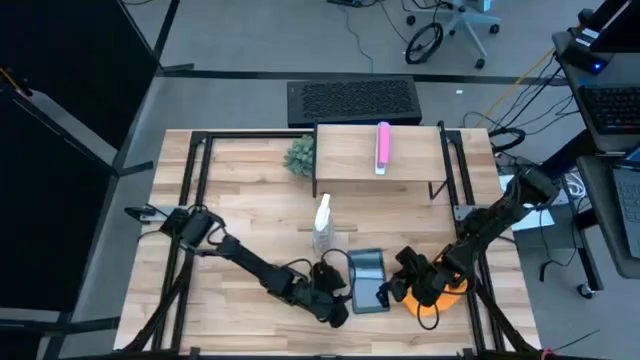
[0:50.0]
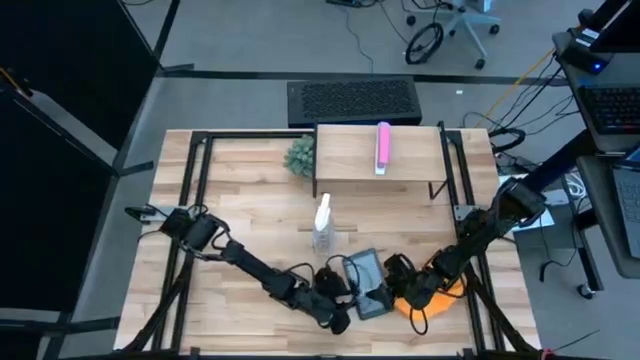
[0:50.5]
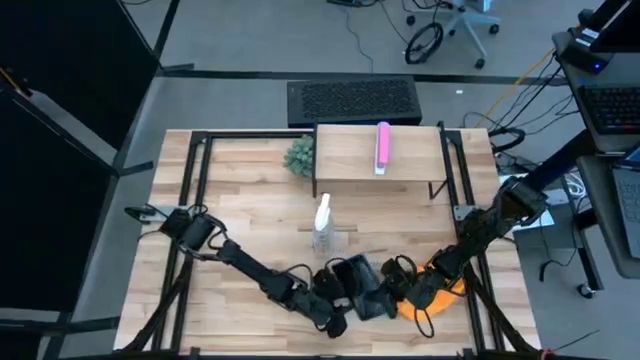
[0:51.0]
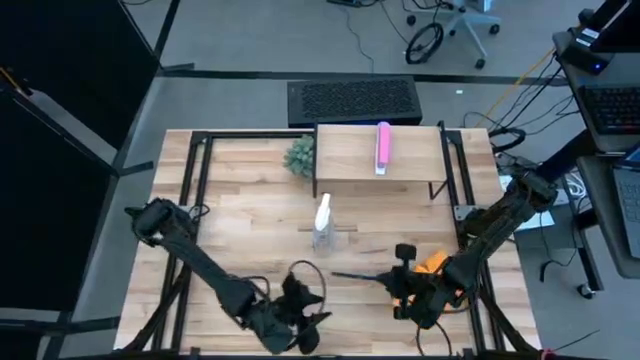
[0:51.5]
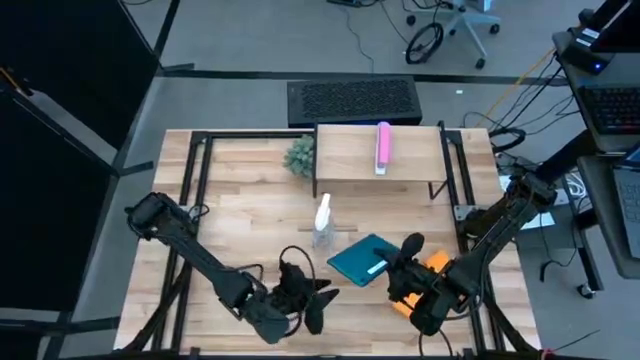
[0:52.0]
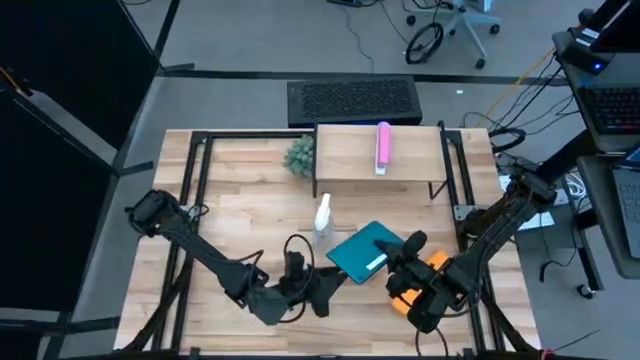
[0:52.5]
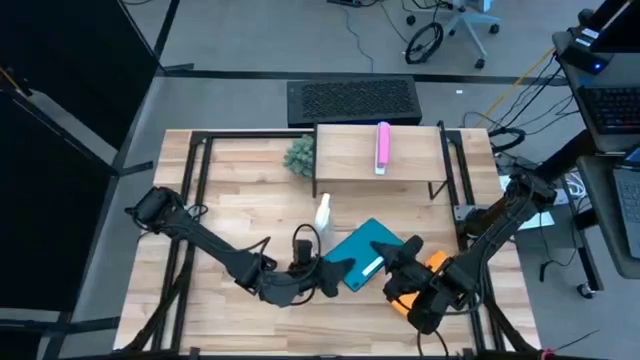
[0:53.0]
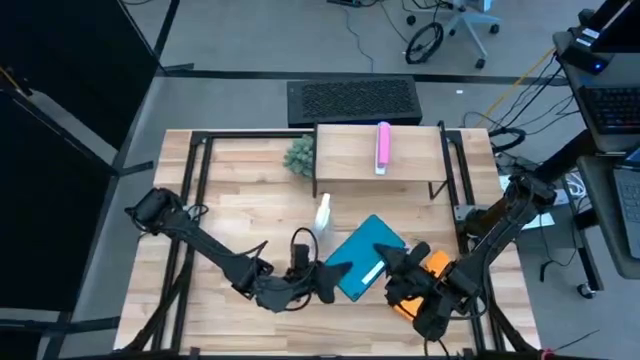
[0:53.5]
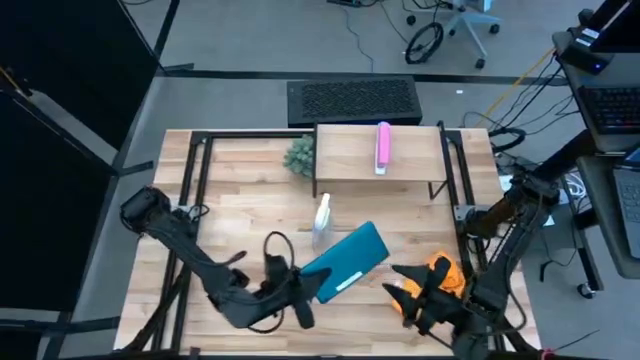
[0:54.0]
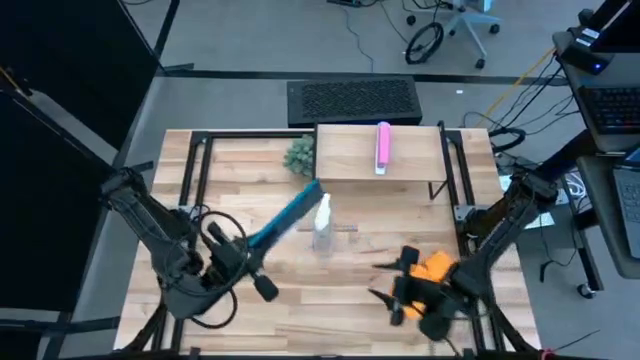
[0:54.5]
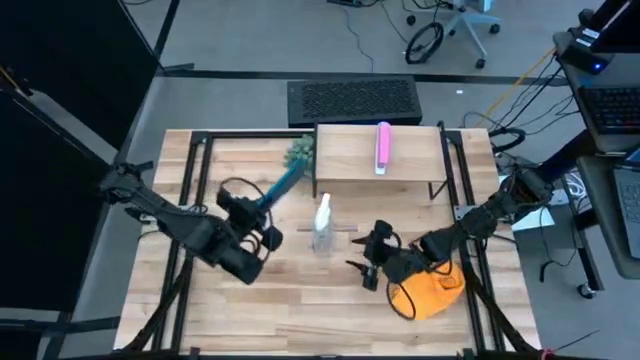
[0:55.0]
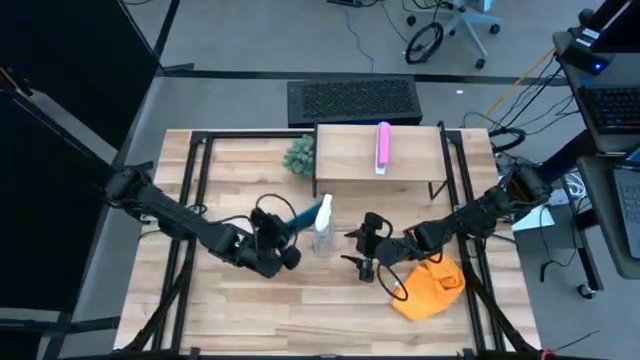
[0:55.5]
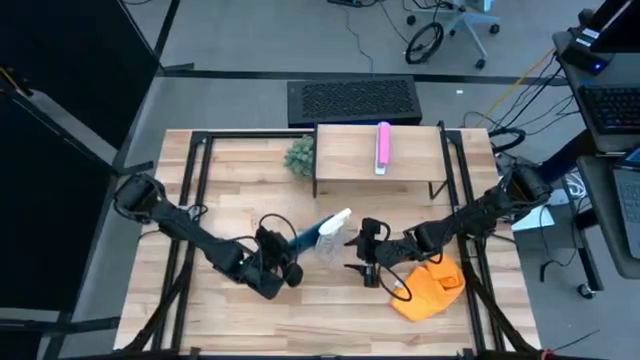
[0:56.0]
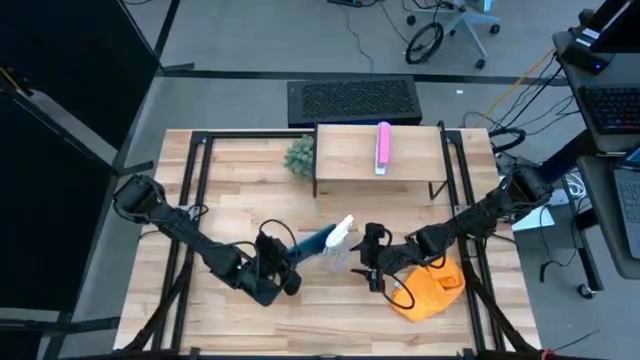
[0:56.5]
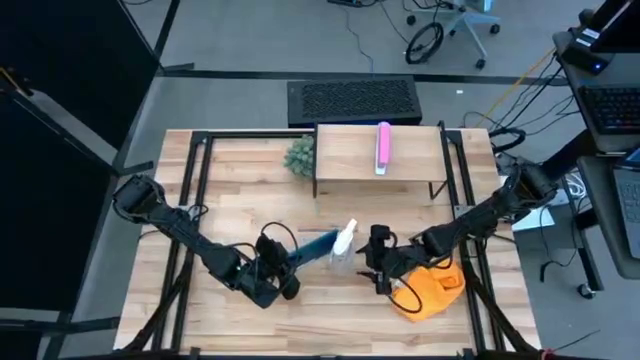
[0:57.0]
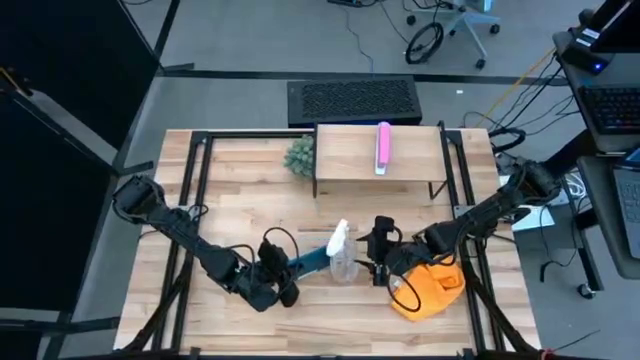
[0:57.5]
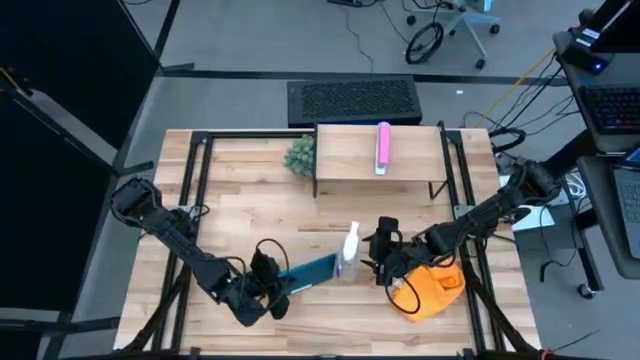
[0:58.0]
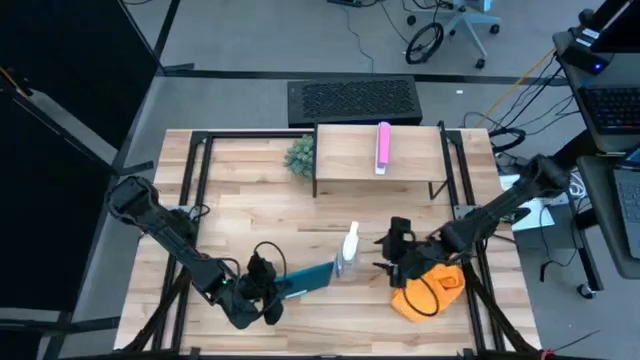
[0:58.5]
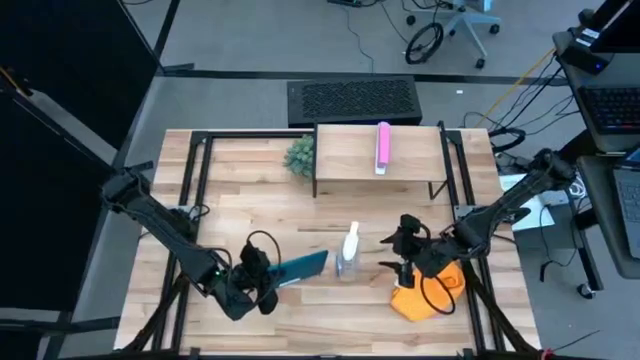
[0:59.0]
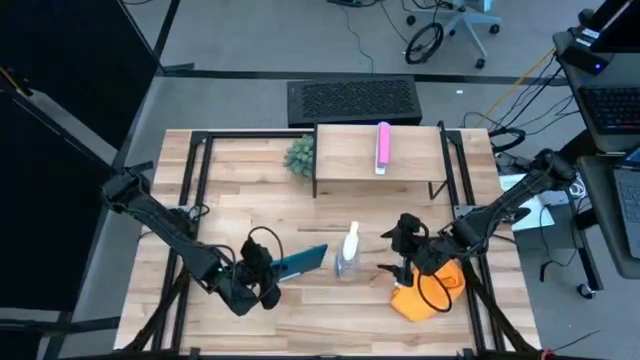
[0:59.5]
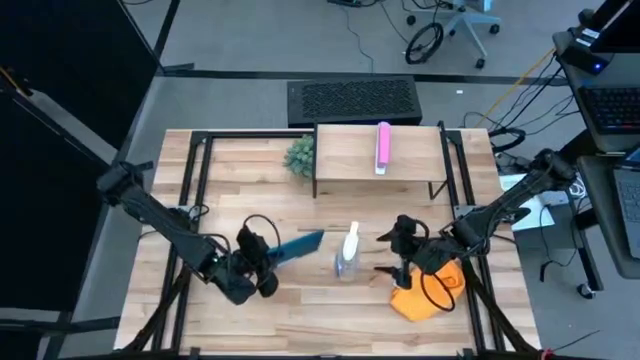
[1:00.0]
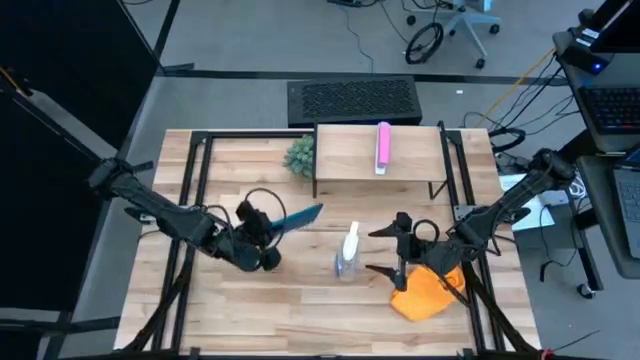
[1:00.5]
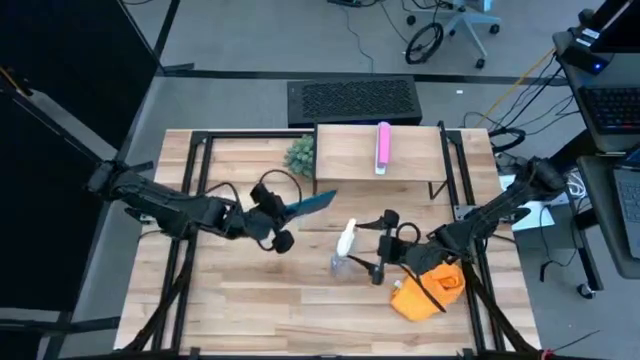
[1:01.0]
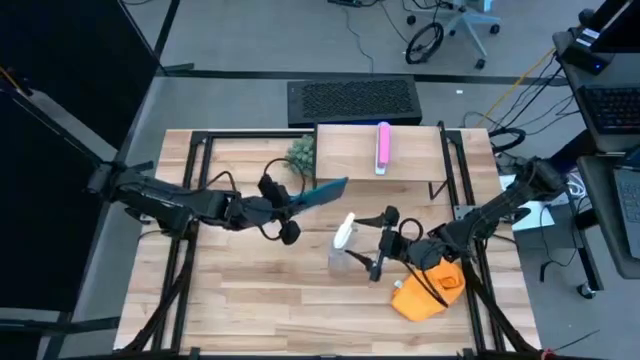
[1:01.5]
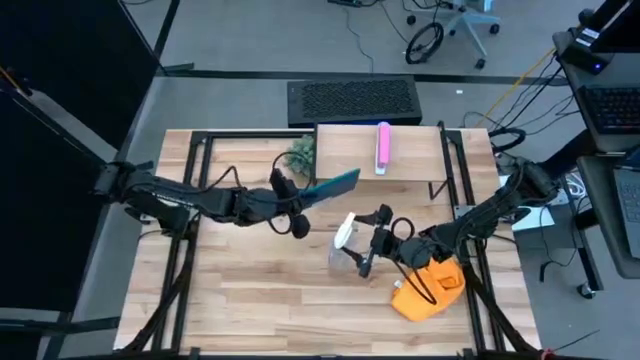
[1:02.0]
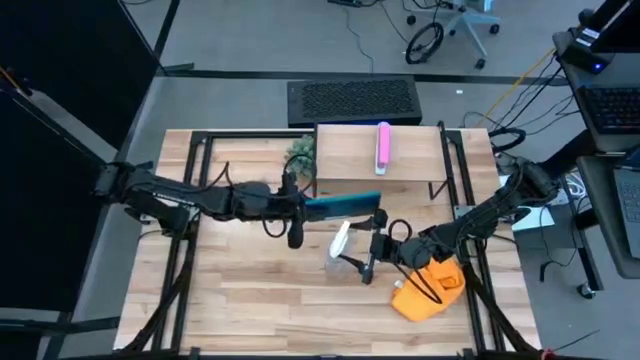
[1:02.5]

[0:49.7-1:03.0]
Task: Apply microfiber cloth
Spray the back of the tablet with the spray bottle

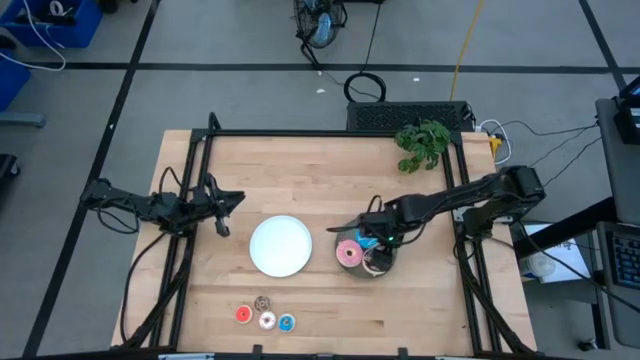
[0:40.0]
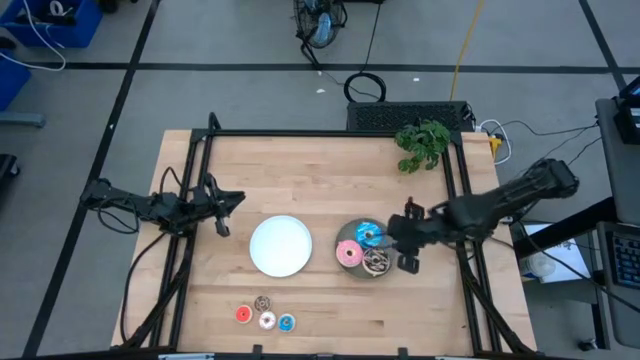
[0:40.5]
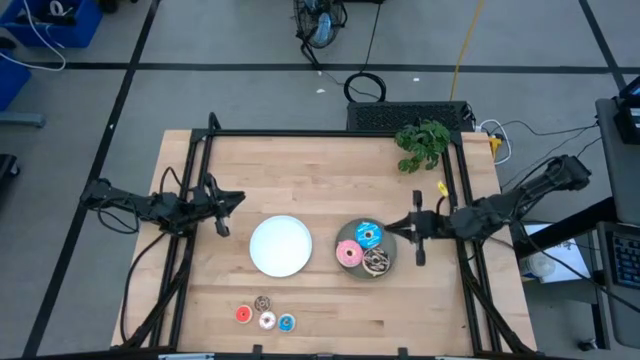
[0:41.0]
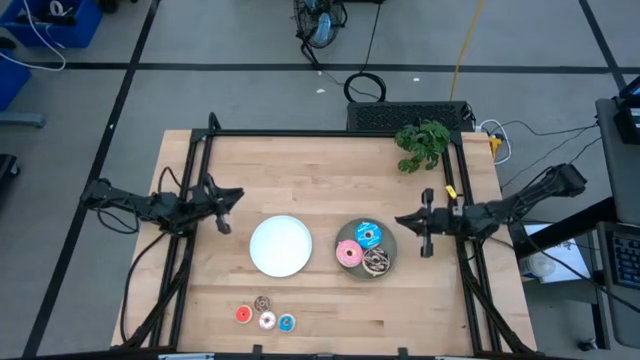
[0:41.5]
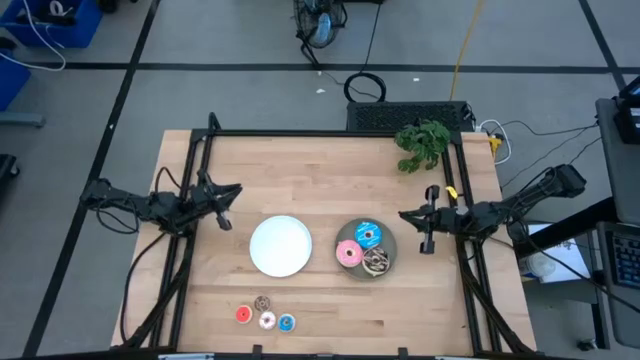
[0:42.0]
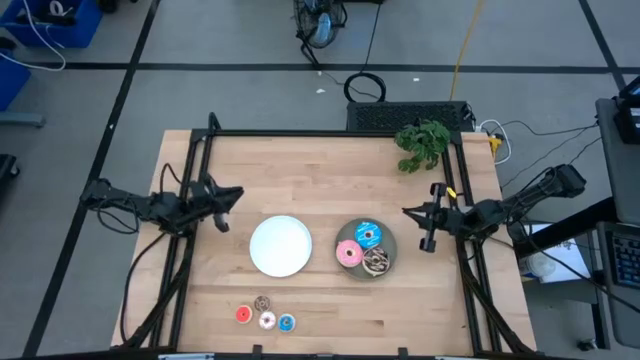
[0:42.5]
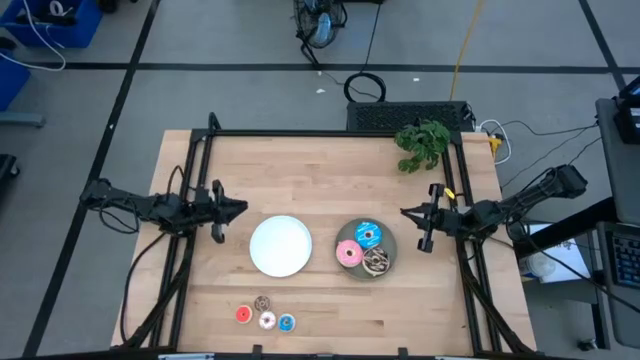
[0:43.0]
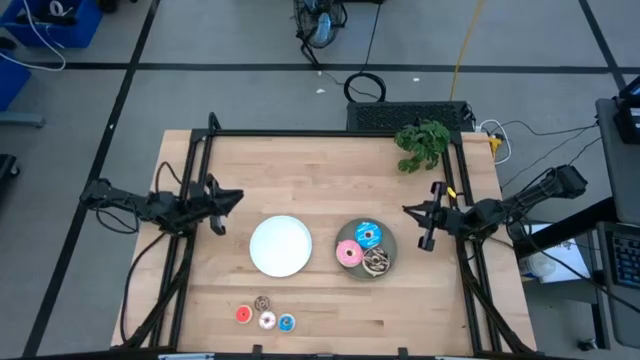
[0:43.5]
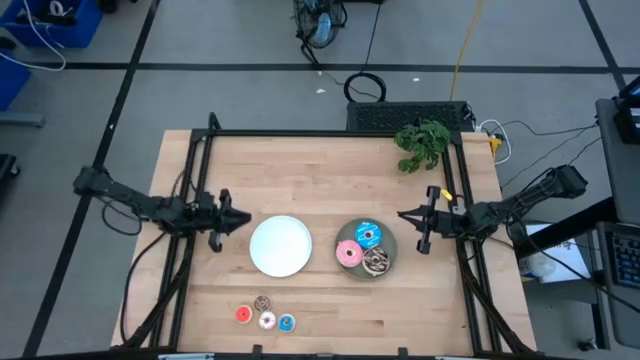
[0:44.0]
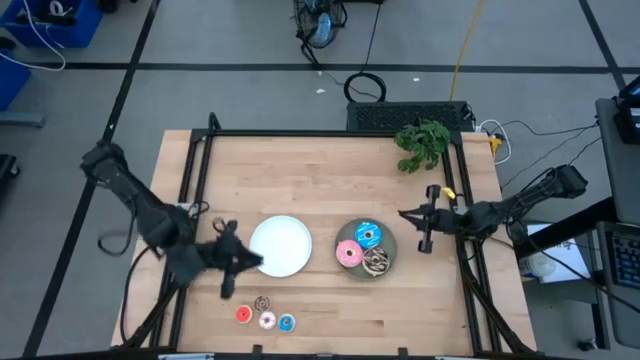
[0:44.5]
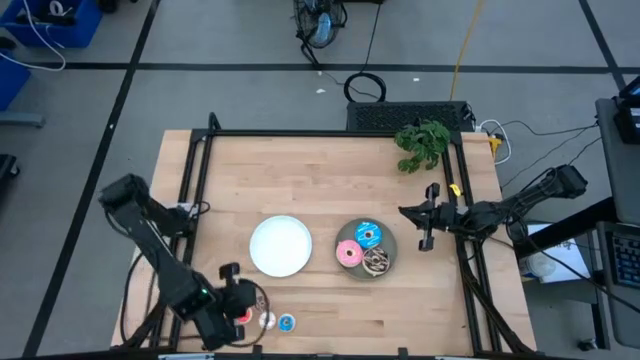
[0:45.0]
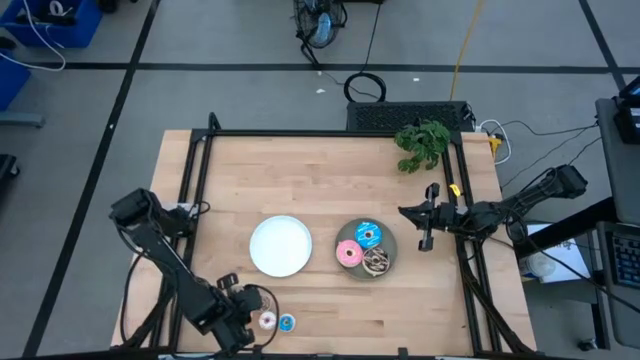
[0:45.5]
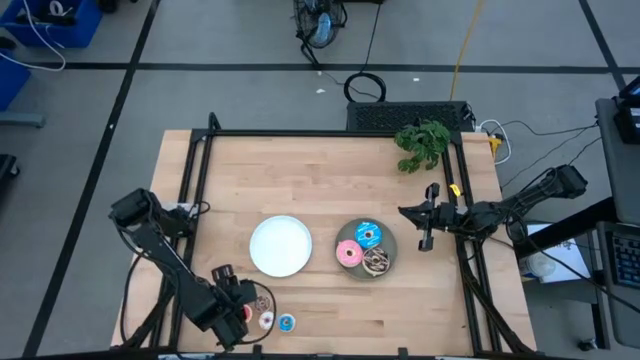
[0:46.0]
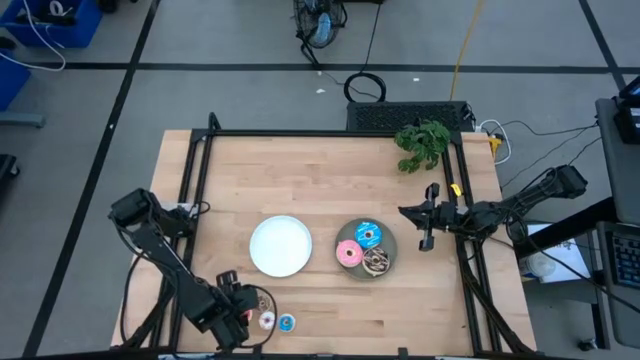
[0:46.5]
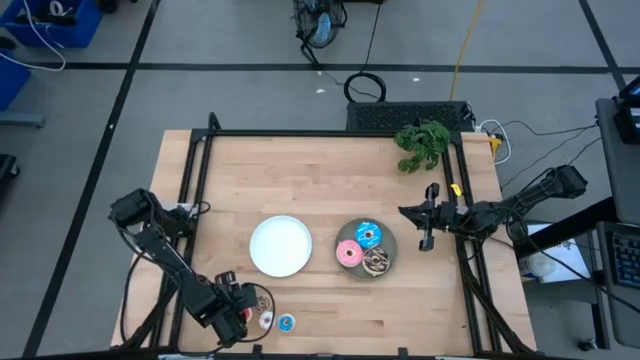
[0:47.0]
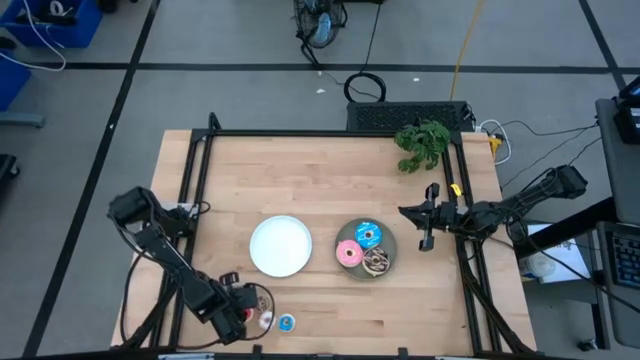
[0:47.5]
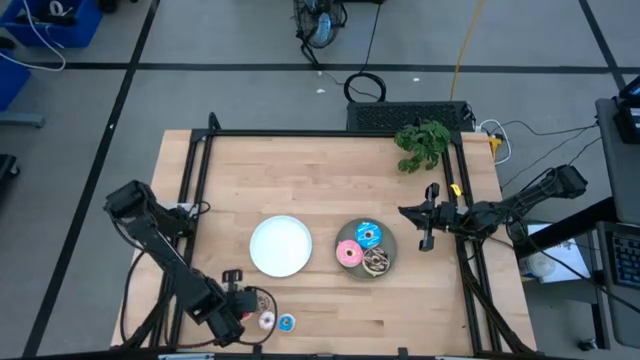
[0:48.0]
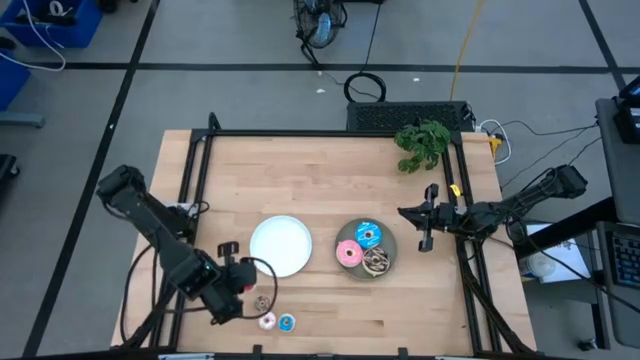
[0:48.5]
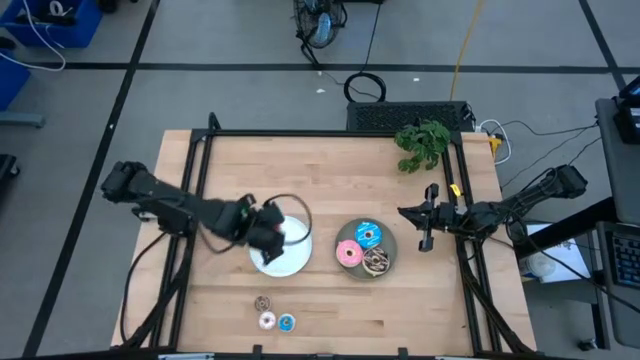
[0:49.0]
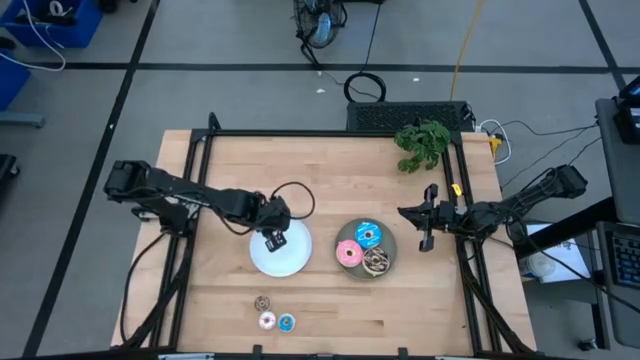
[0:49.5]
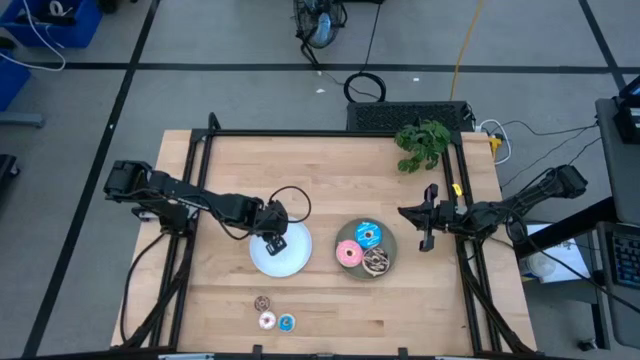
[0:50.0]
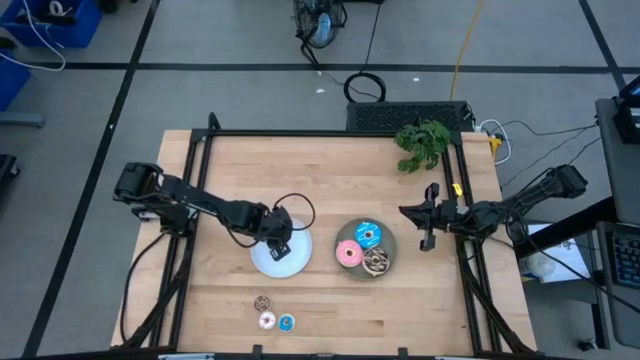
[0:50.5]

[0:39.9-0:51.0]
Task: Pick & Place donuts
Put the small red donut on the white plate
